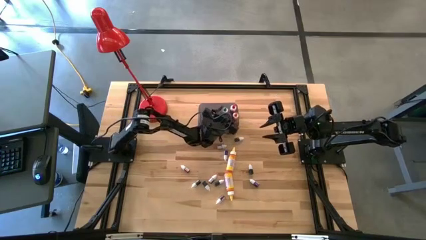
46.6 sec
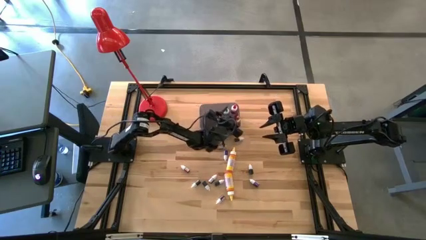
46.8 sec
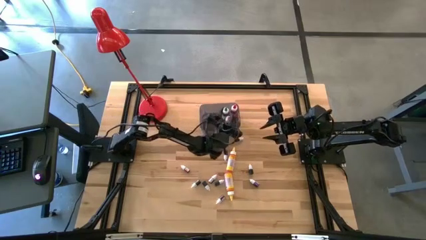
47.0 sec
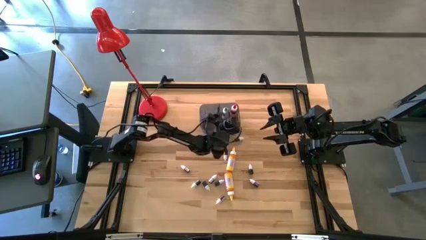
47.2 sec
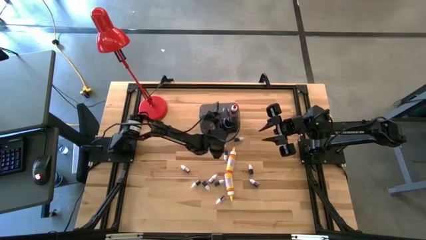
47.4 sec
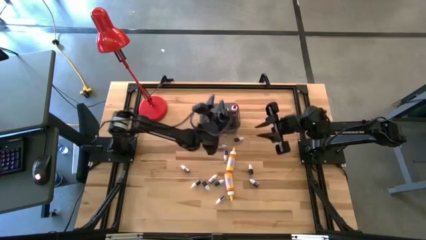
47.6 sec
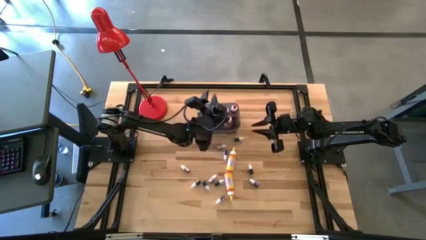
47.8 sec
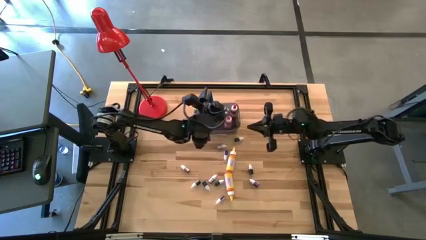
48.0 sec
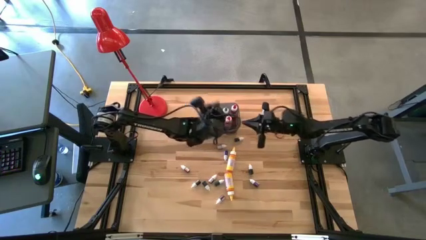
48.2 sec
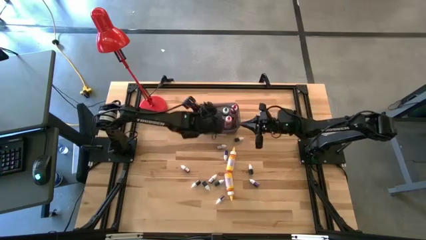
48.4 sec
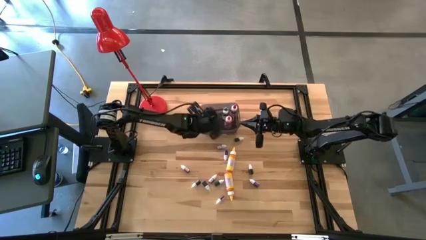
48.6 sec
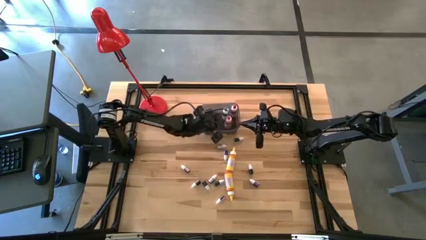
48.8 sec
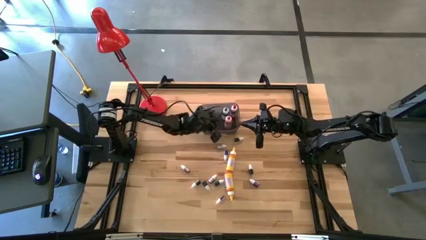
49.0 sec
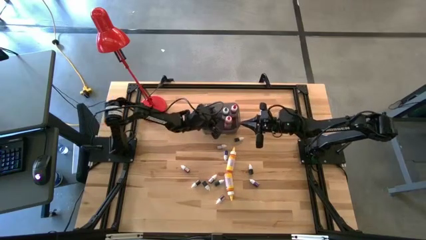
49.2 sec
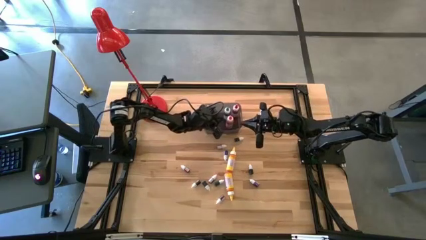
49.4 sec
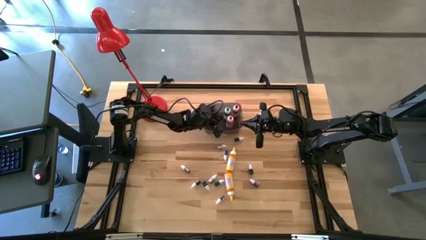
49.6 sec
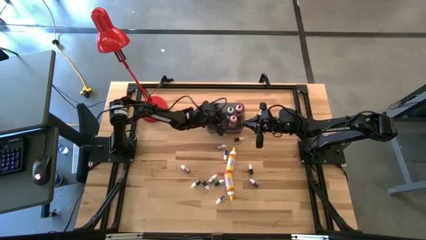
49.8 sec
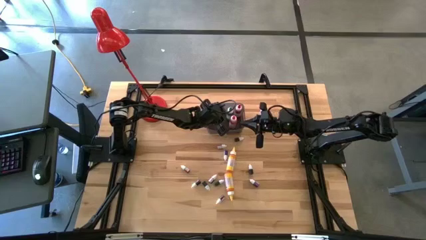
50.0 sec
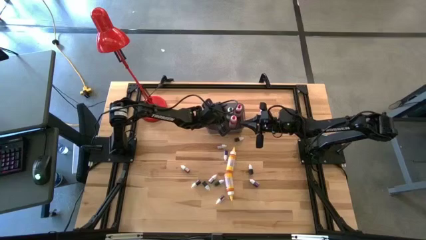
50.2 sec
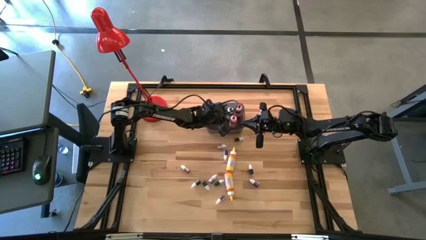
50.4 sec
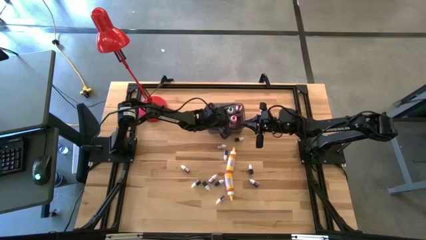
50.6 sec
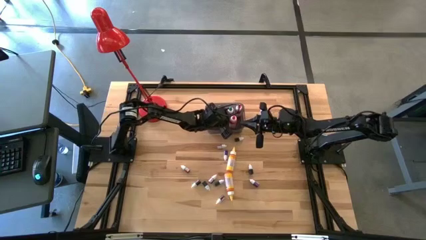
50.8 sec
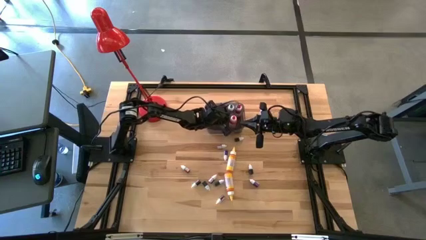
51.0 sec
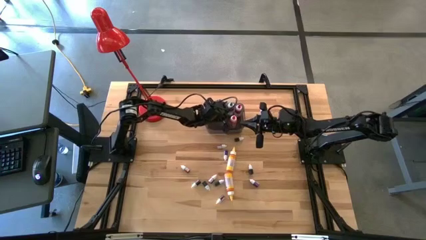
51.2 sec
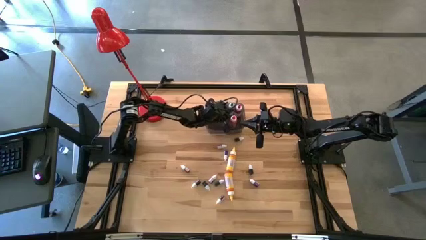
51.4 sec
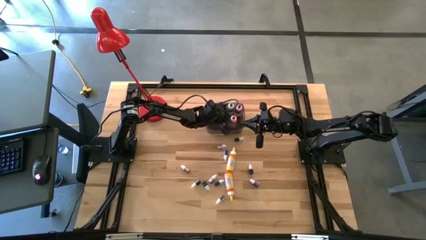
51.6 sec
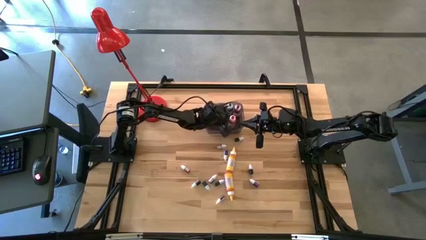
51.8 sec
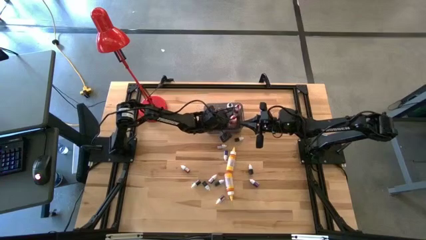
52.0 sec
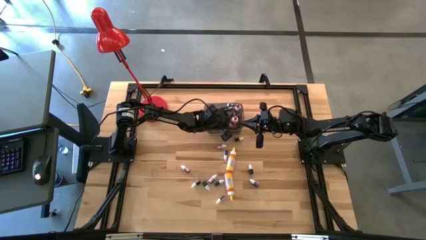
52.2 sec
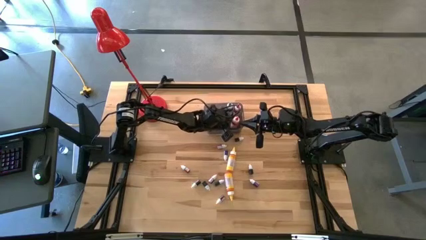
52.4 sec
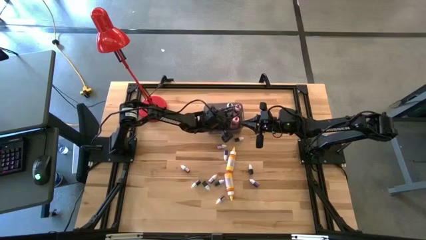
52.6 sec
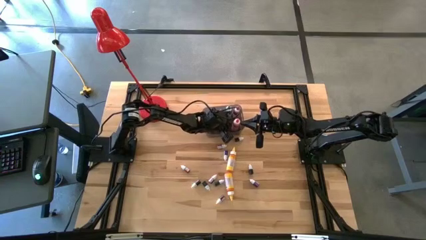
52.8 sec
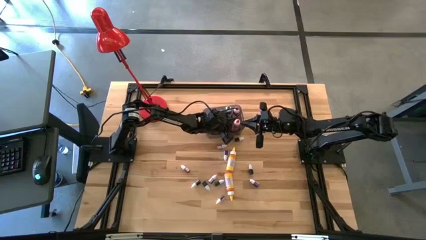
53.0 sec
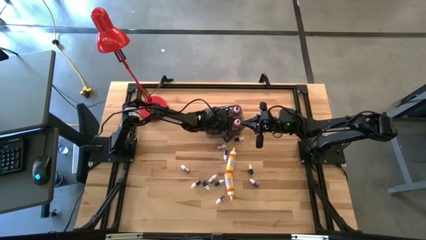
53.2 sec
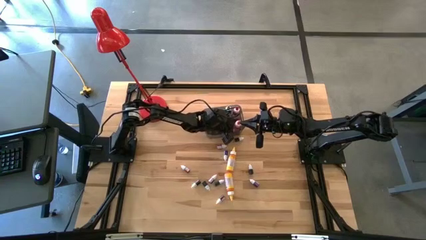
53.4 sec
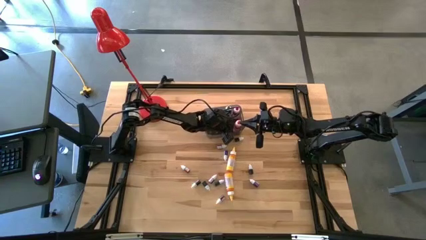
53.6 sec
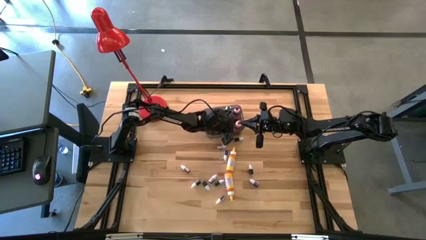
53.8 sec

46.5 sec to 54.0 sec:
Task: Pick & Place food coloring
Adjust the large food coloring bottles in the black bin

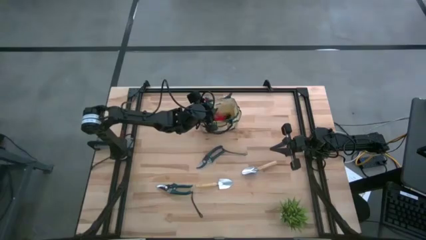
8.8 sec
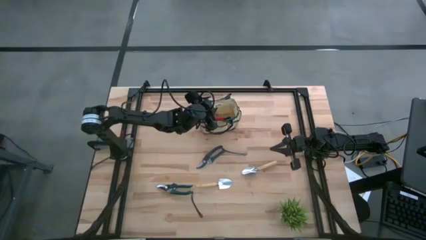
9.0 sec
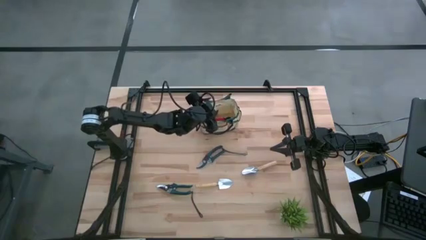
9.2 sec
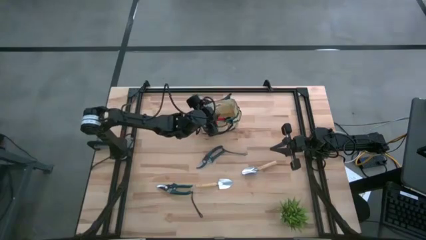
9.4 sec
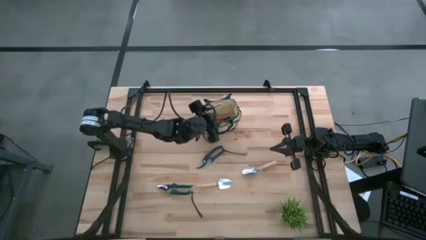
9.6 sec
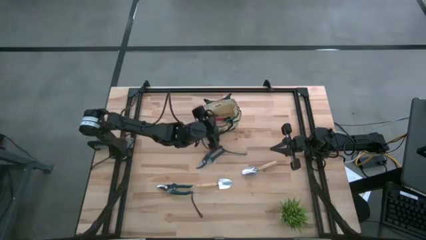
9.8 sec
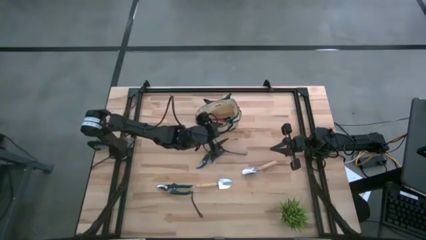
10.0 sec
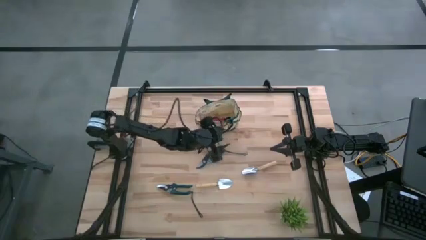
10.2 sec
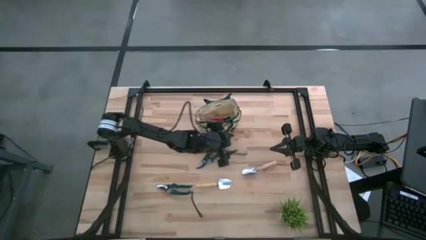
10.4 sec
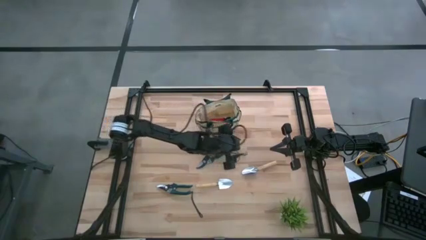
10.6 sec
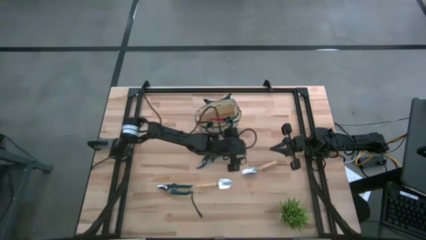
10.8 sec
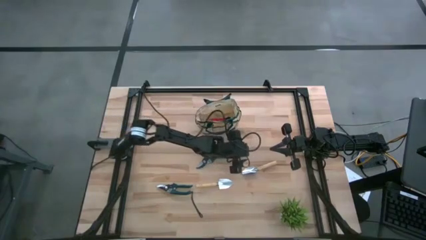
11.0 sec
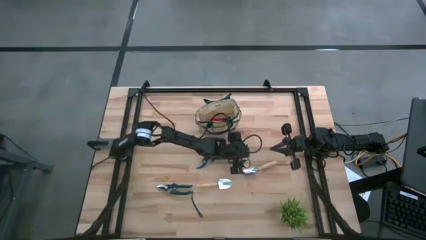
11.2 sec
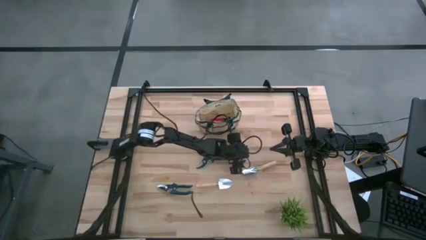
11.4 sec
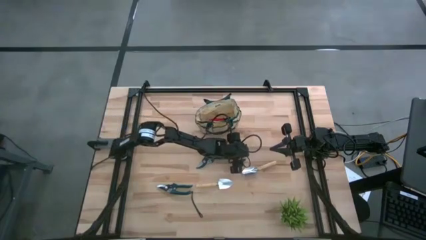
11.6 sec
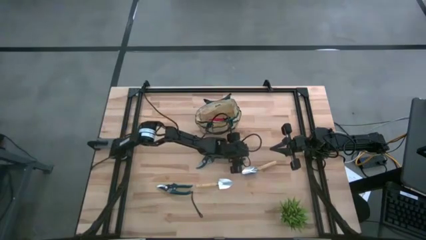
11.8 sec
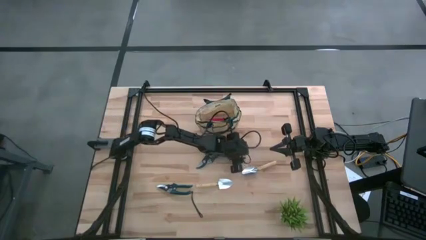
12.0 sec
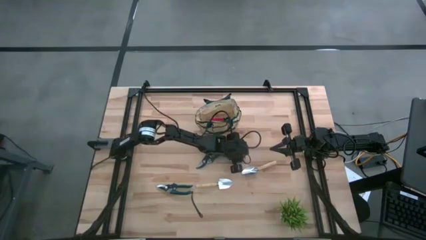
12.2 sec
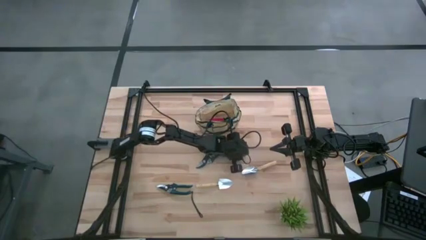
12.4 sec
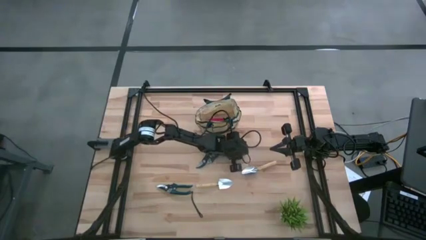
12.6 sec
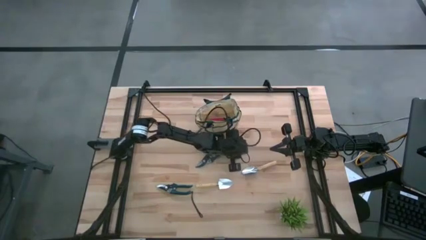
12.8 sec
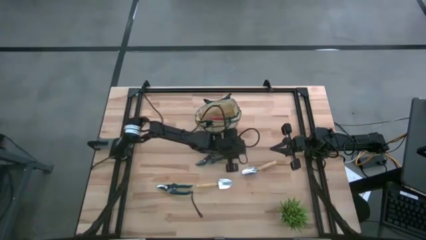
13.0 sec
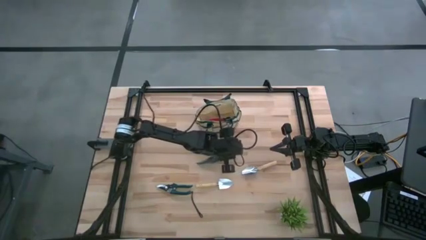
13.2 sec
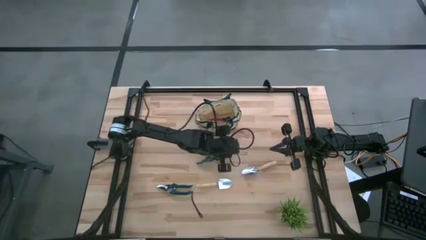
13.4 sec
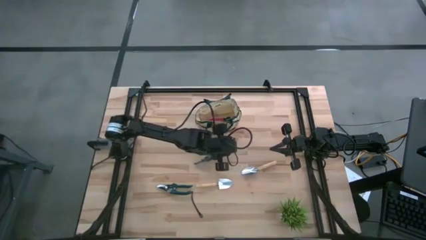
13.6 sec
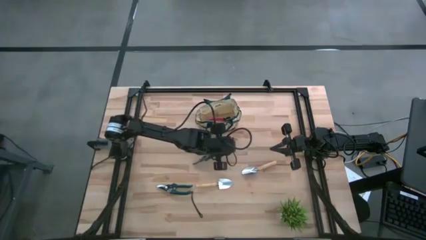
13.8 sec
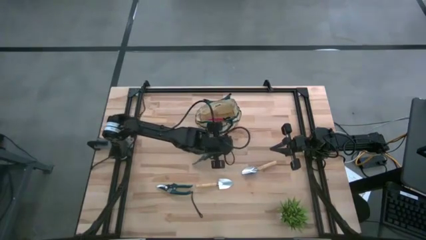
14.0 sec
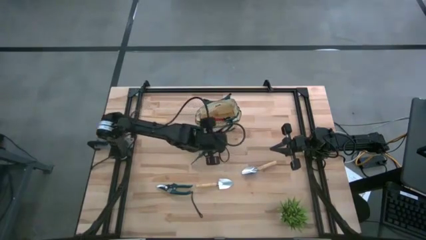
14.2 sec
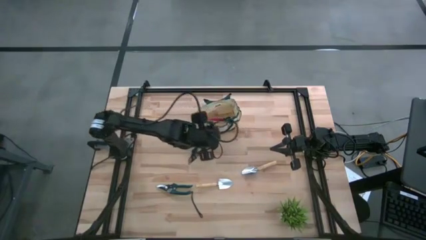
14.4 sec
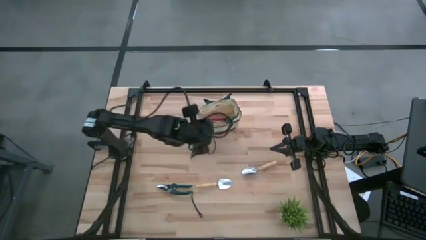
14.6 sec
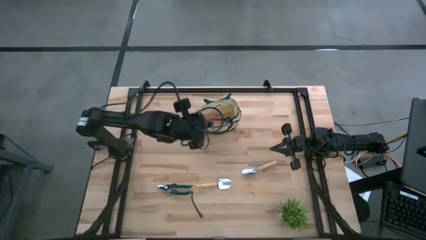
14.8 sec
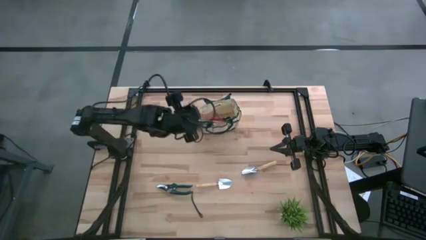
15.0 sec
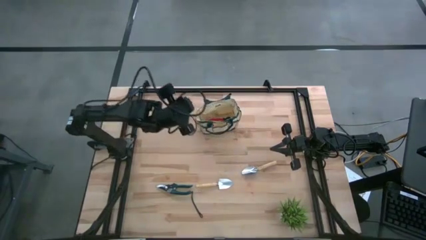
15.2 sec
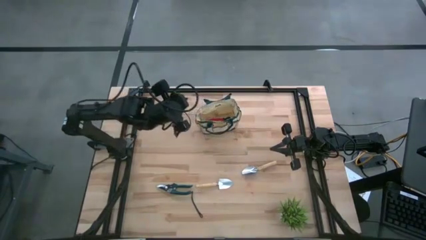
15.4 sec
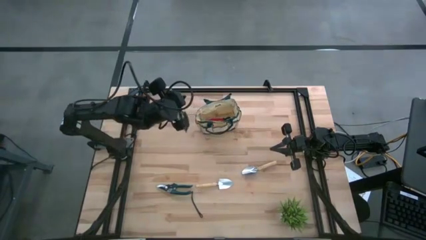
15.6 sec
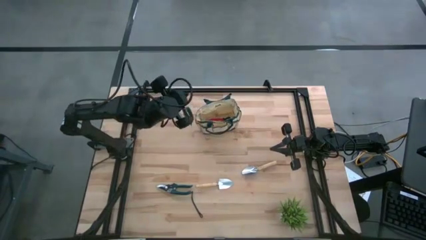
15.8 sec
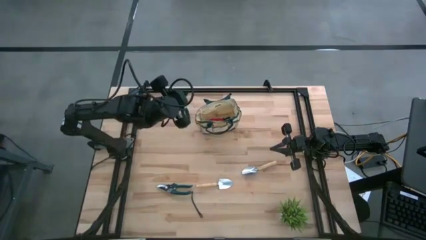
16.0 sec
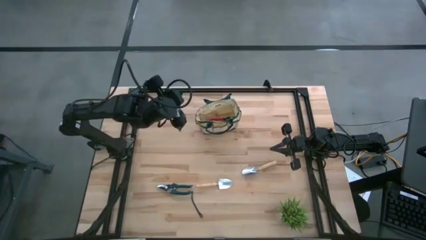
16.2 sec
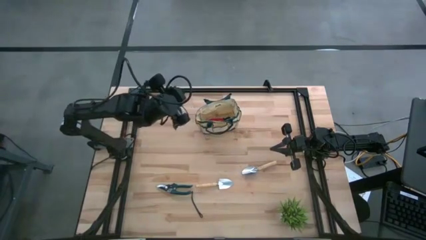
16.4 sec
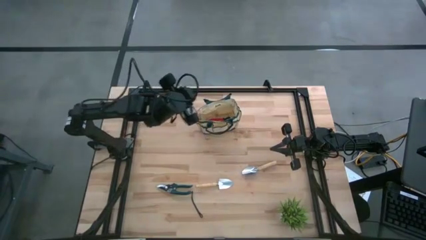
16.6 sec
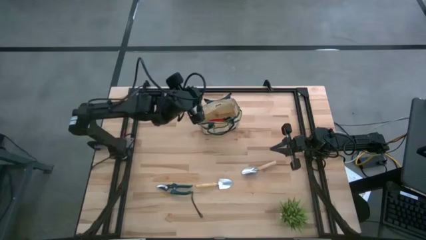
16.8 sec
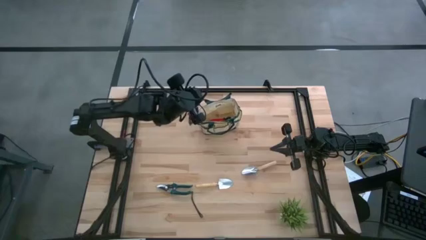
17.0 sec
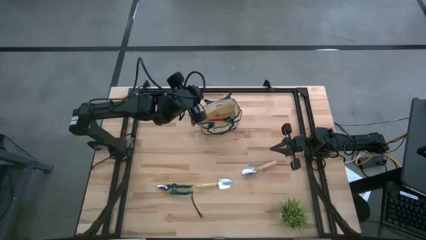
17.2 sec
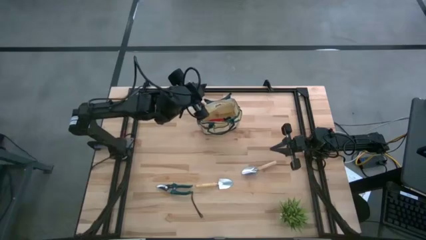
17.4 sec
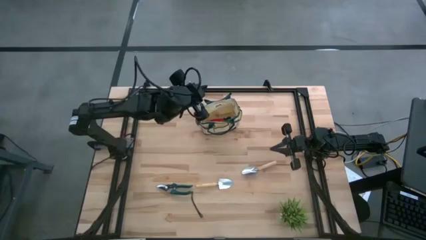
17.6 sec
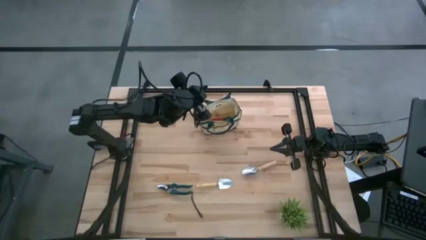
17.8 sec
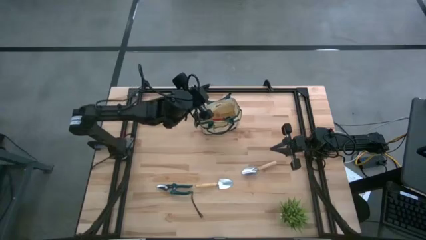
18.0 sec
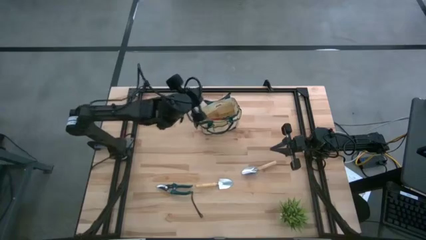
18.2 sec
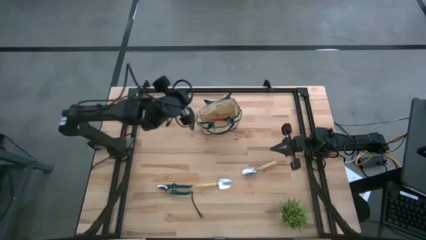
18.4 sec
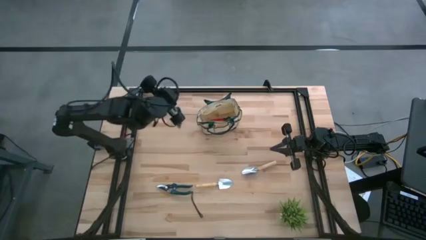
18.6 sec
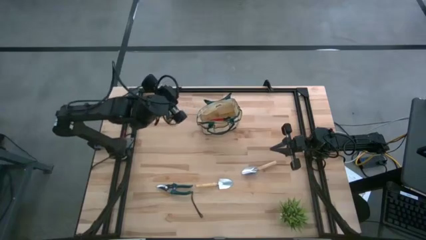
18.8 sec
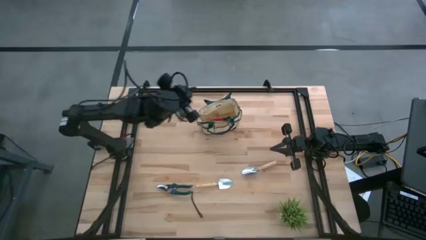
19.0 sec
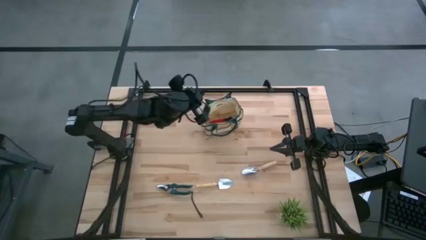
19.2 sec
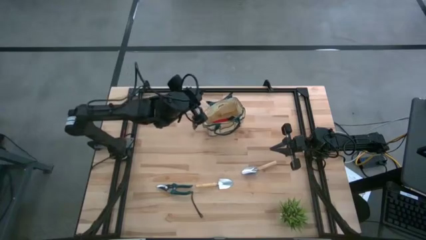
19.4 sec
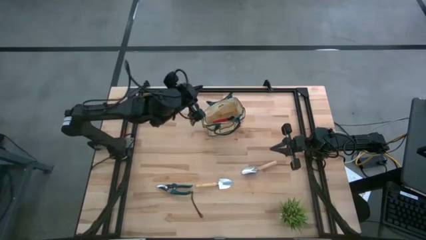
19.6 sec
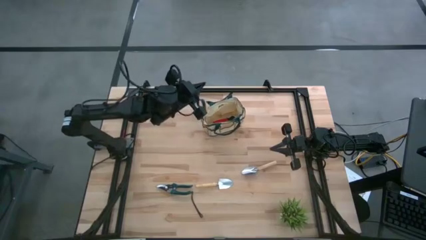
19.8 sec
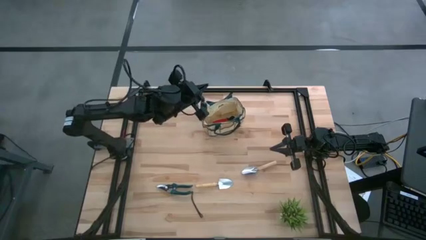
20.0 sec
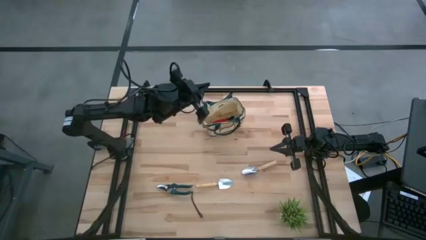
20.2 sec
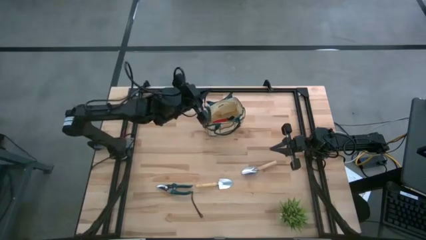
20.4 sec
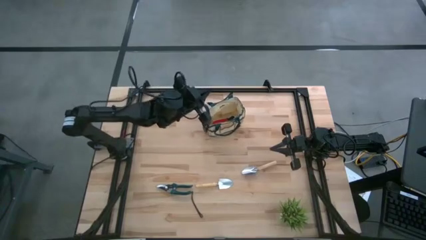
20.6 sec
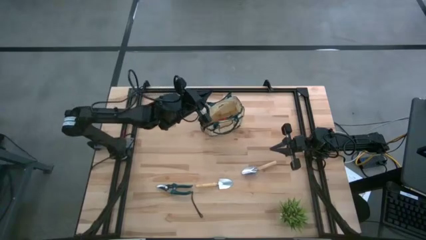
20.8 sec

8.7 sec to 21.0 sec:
Task: Pick & Place Garden tools in Gardening bag
Put the top right shear scissors into the gardening bag
